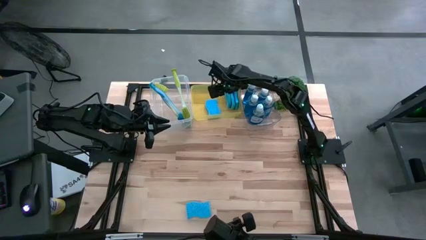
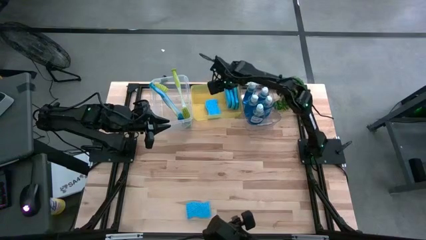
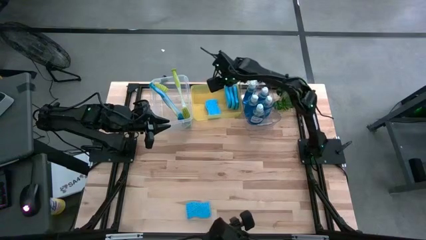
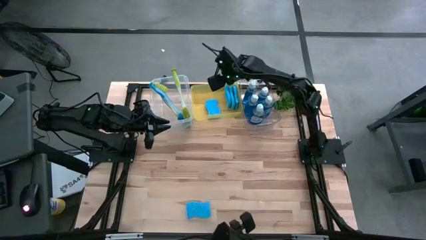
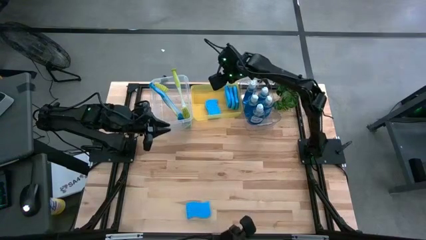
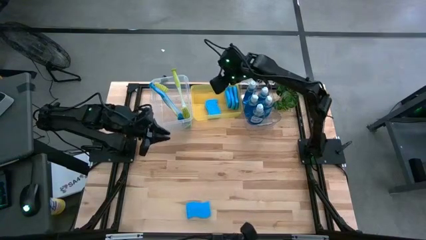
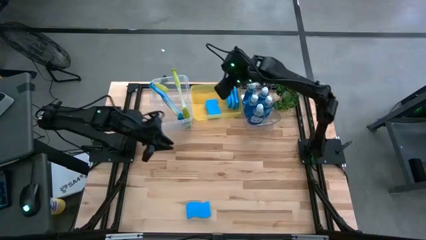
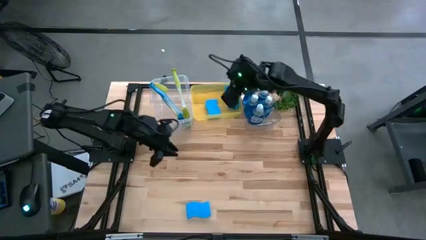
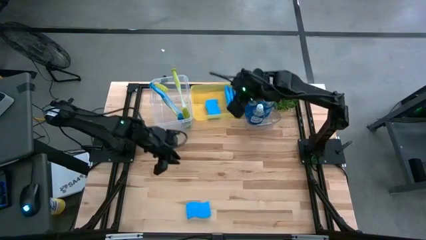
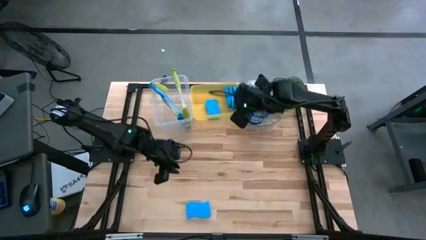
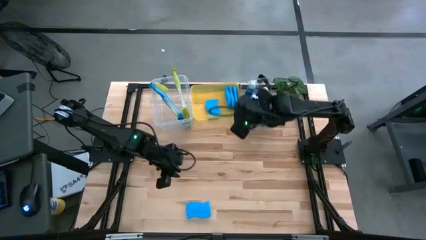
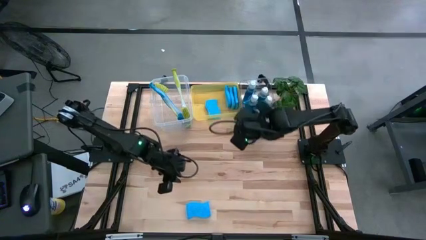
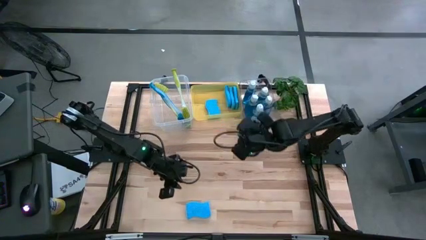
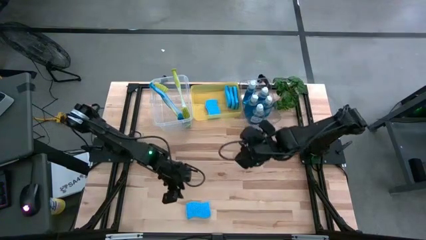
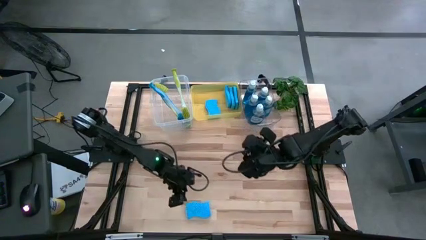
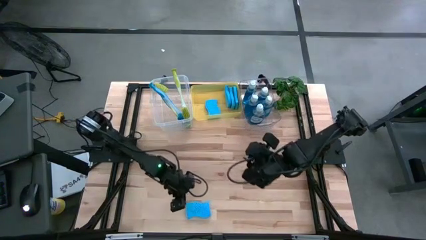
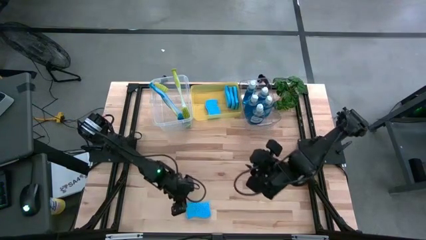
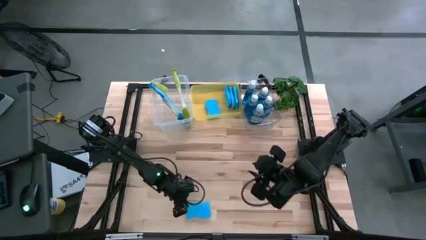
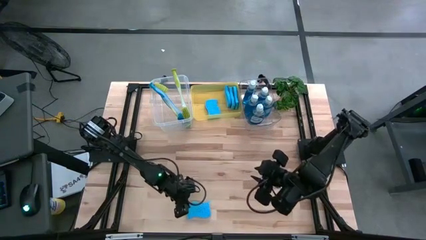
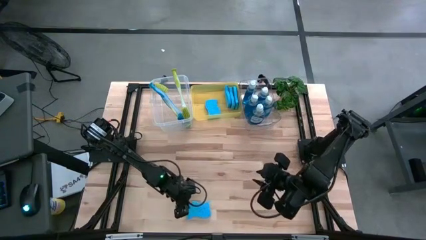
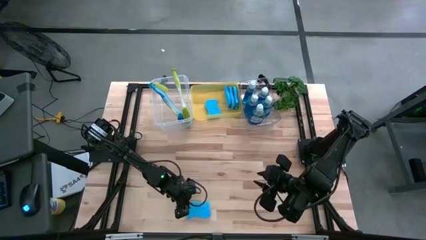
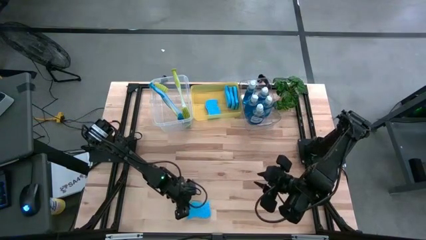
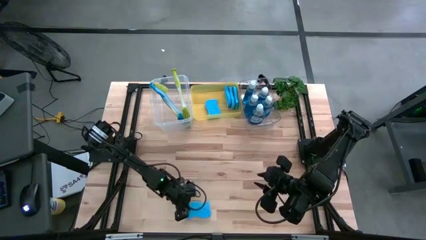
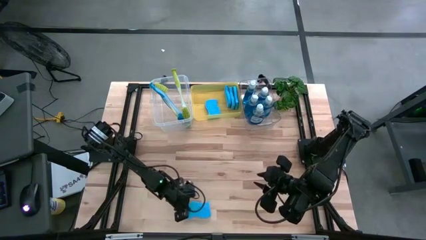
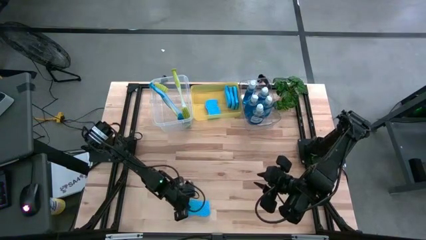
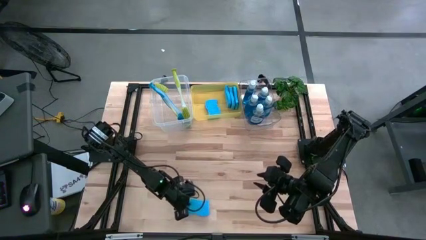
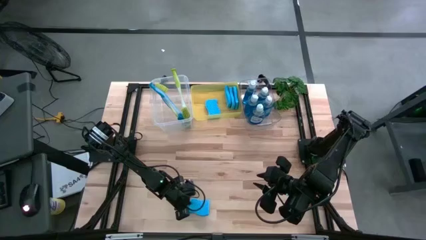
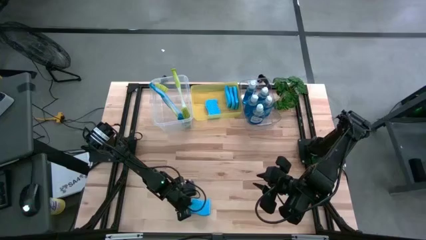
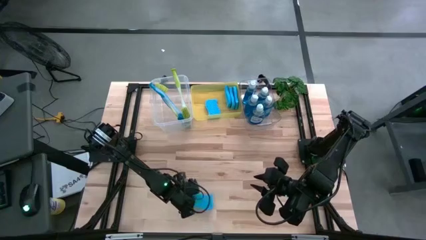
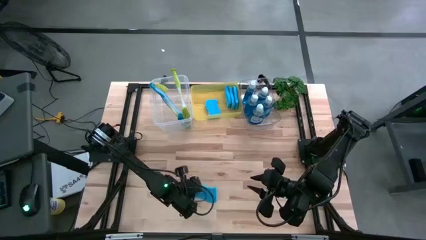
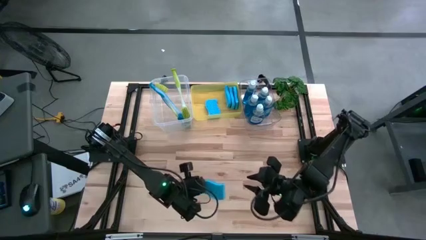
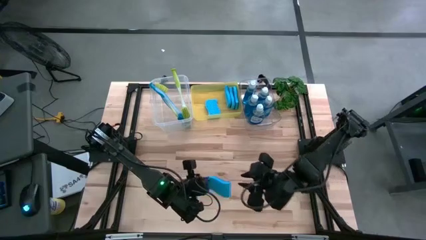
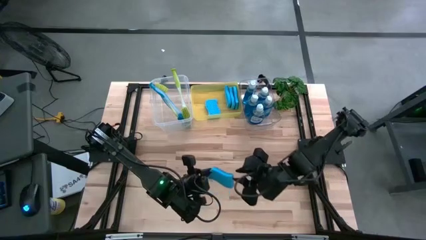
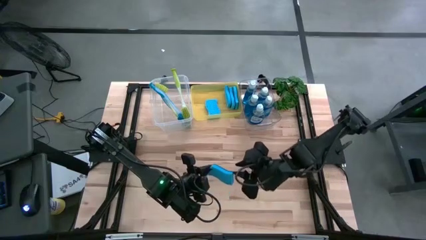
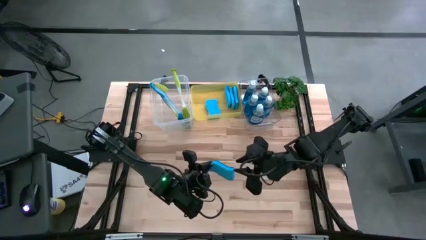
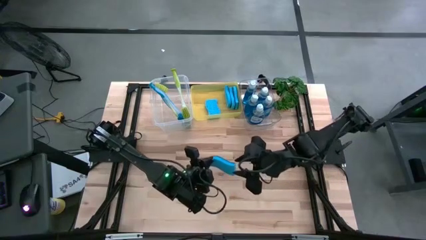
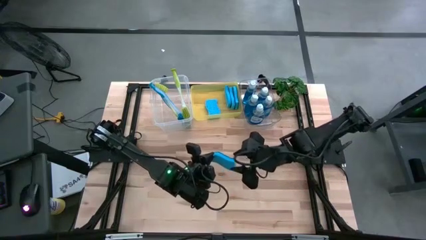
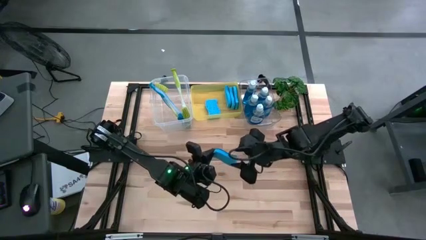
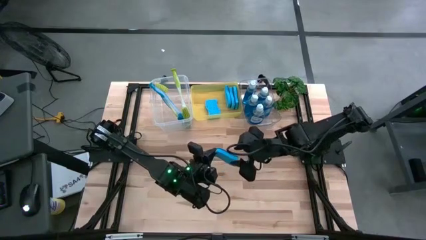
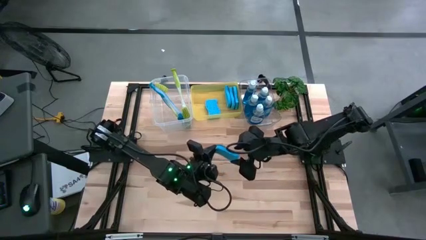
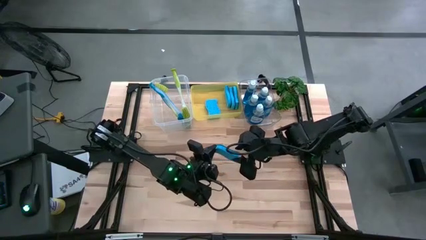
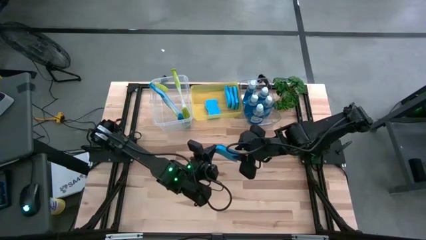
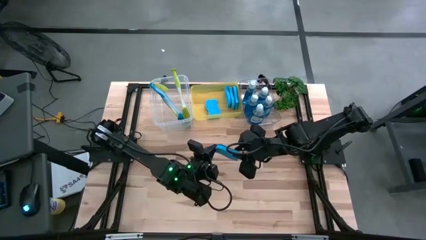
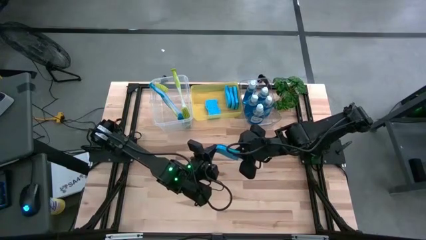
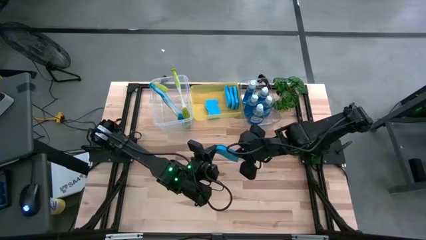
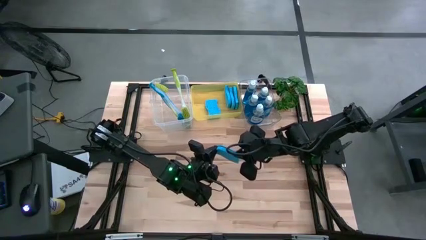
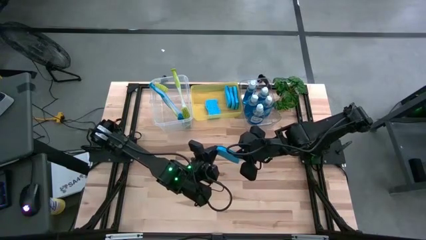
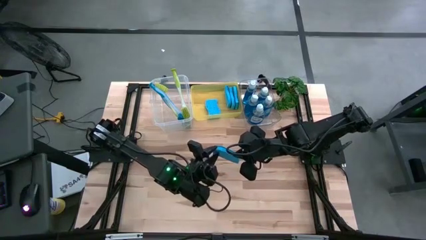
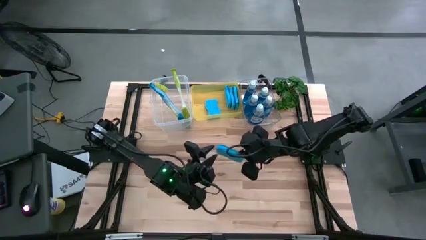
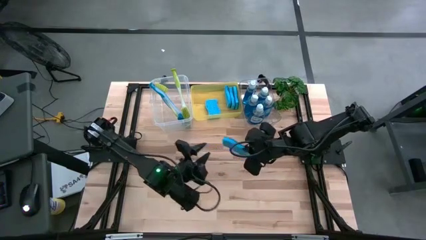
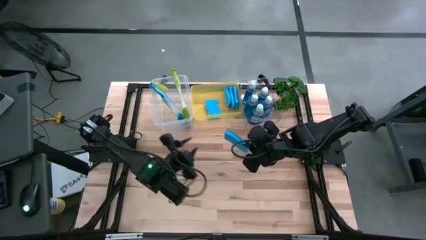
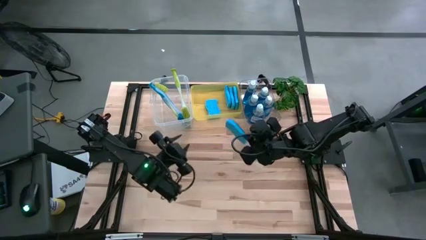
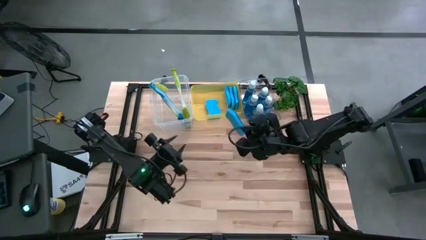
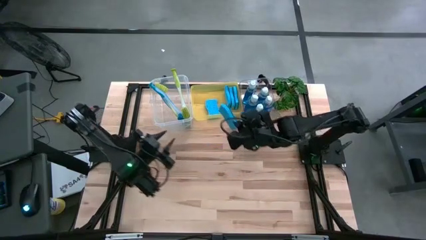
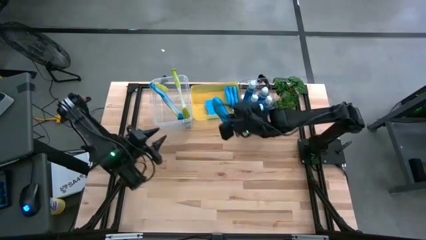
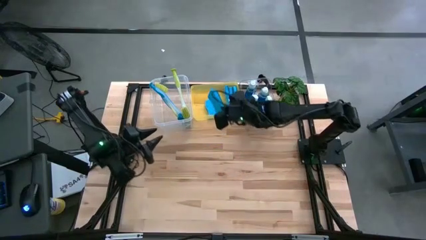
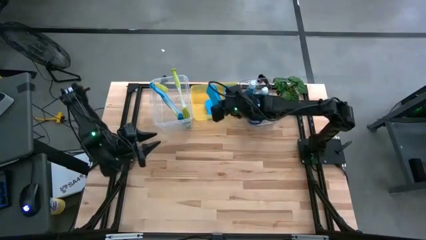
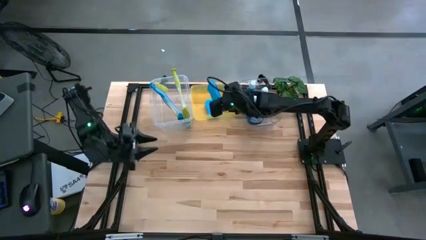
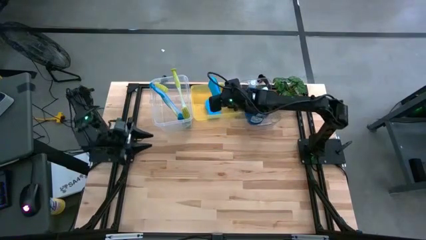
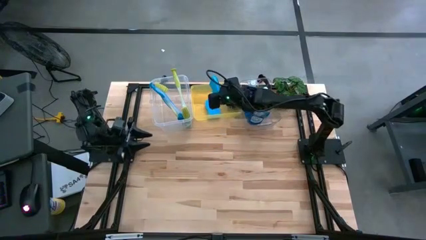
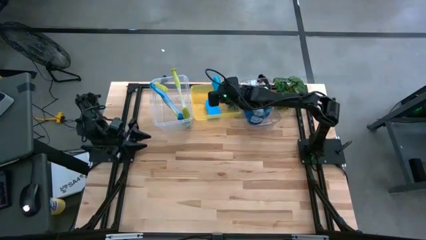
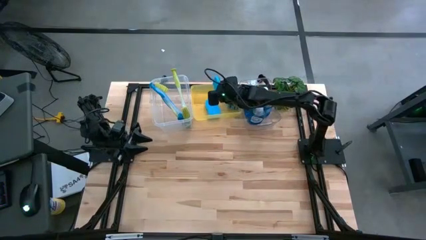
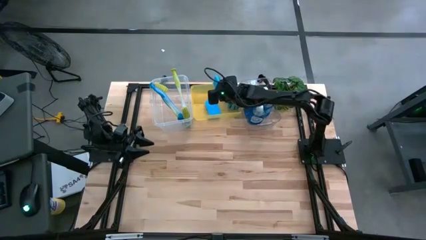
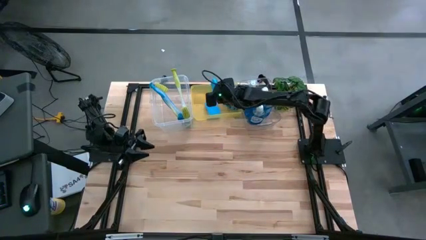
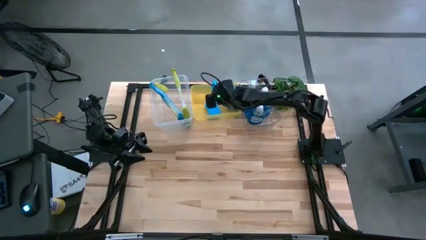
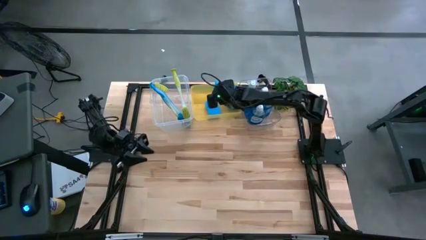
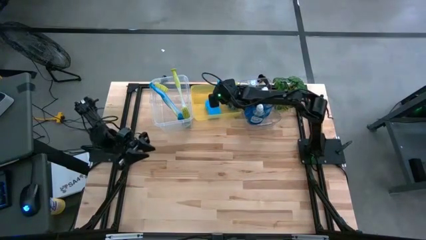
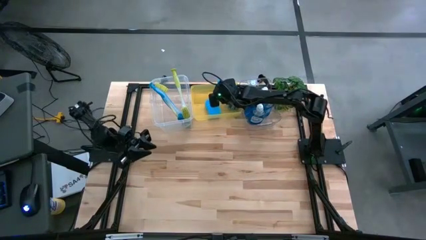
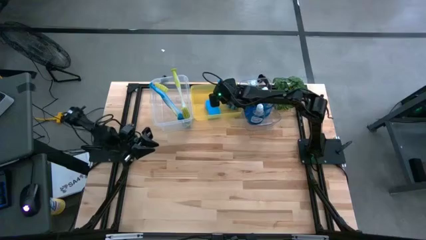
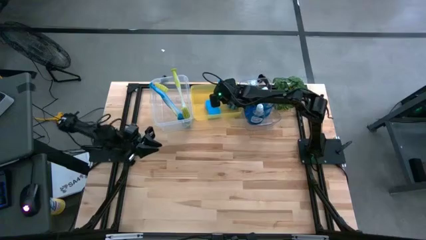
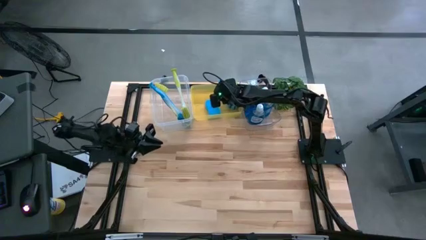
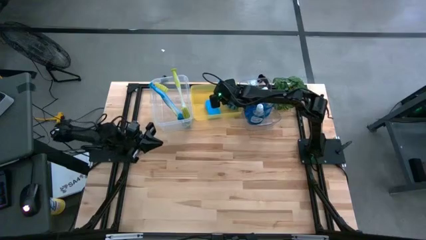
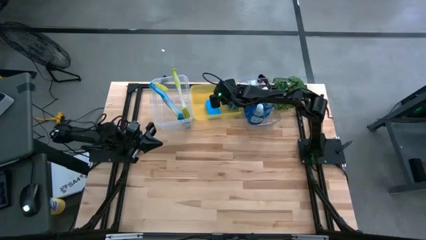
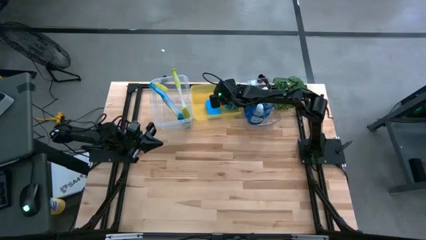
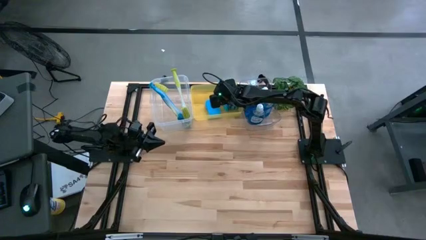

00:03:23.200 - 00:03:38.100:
Task: Pick & Place Kitchen Sink Supplies
Put the blue sponge into the yellow bin

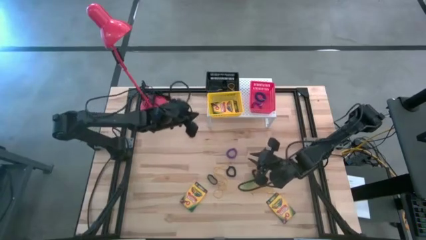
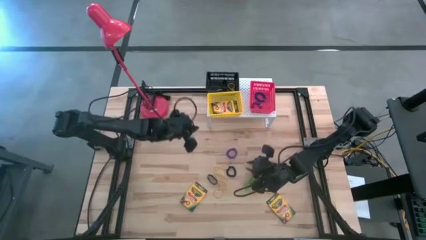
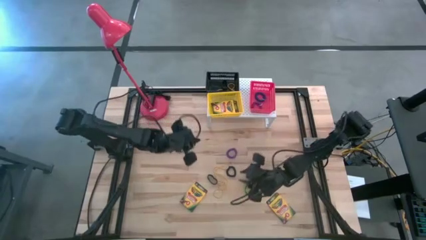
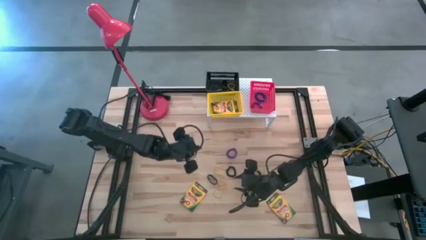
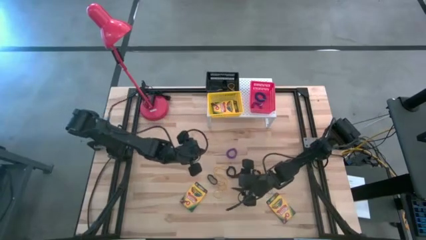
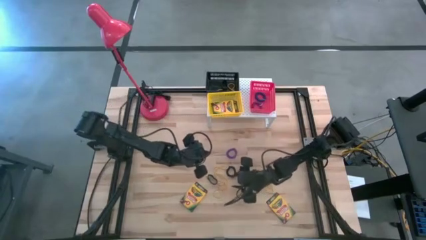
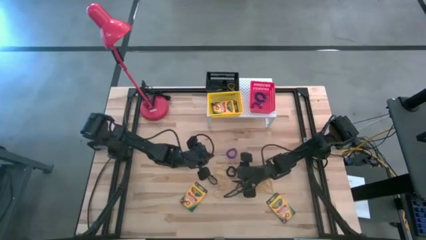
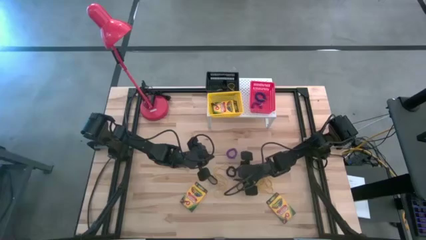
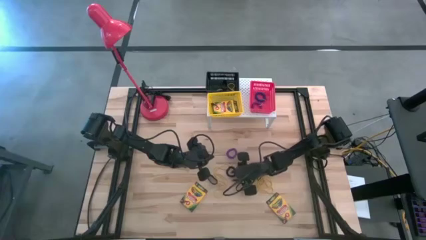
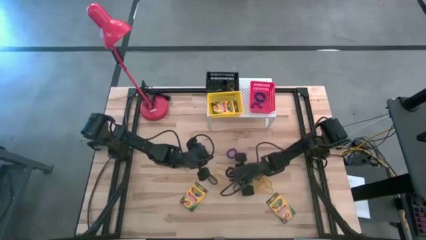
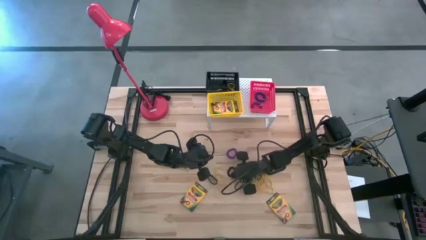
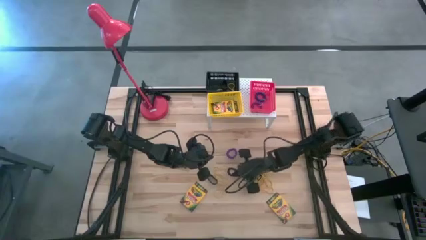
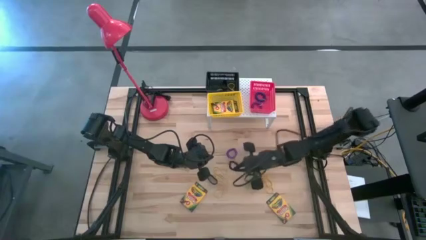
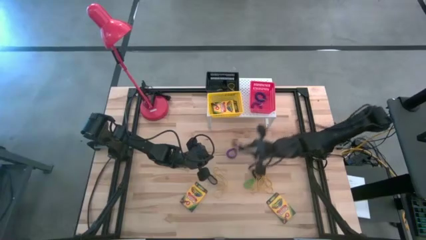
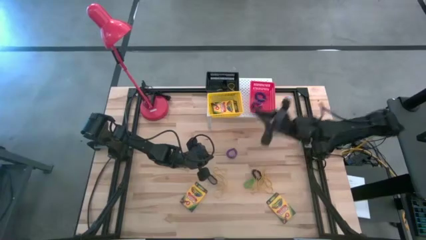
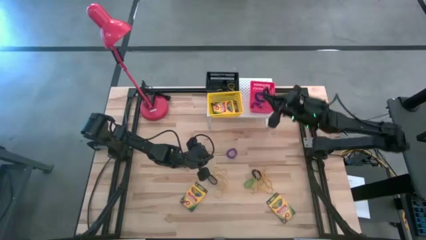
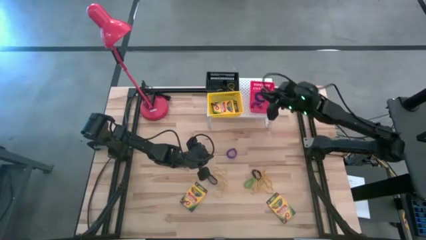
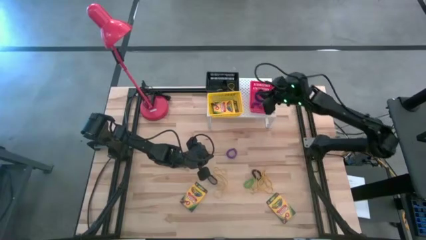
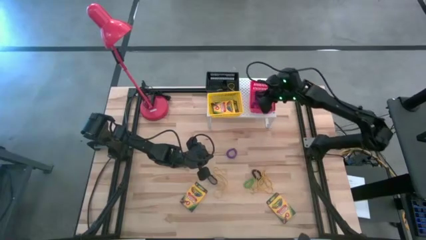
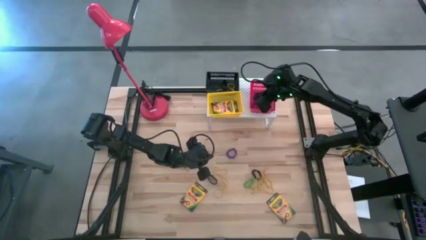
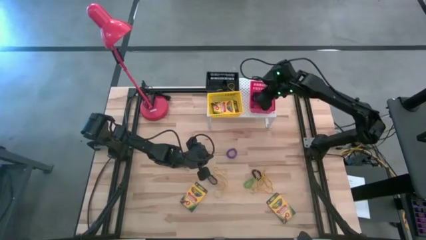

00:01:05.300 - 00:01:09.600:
Task: Pick & Place Office Desk Supplies
Put the black spring keychain into the red bin on the shelf
